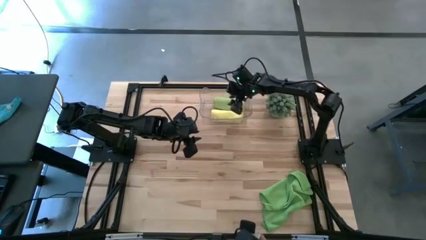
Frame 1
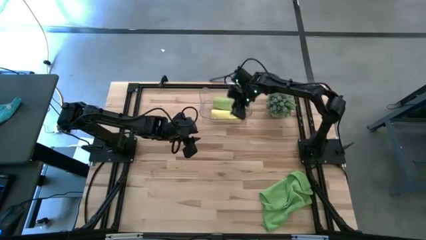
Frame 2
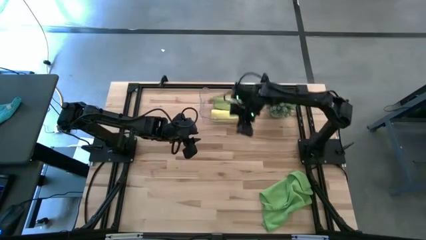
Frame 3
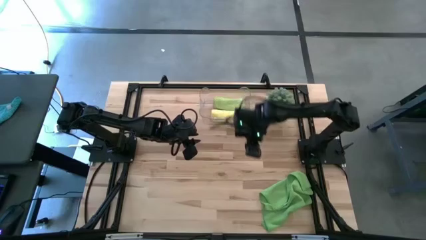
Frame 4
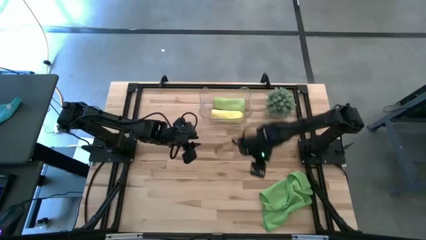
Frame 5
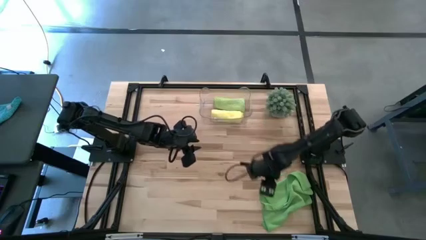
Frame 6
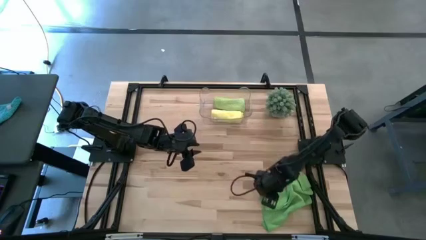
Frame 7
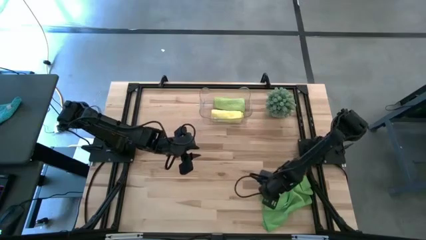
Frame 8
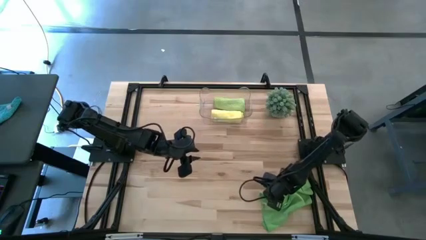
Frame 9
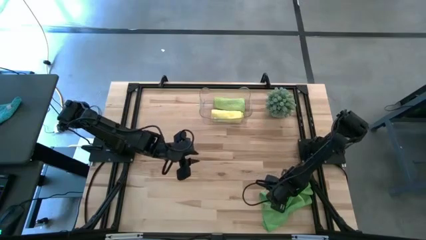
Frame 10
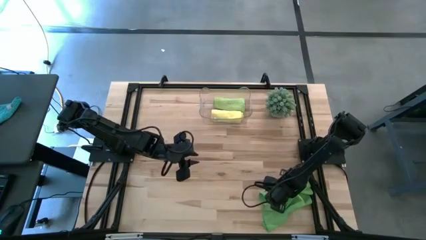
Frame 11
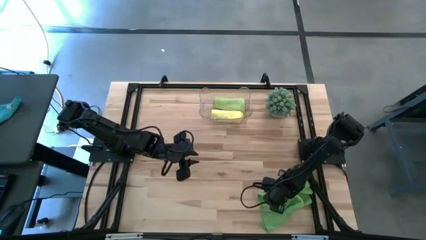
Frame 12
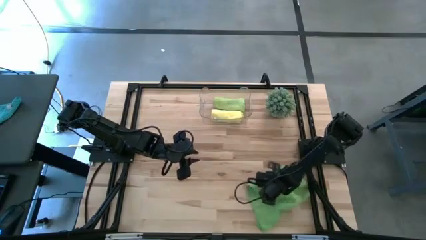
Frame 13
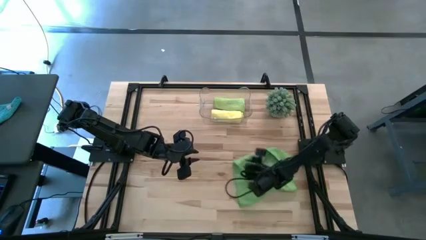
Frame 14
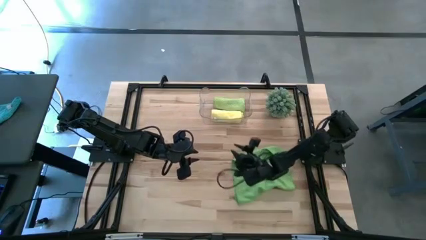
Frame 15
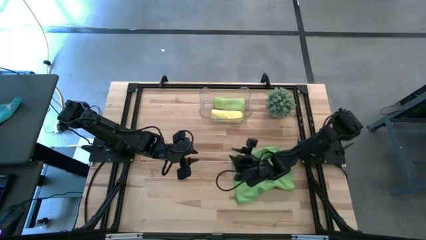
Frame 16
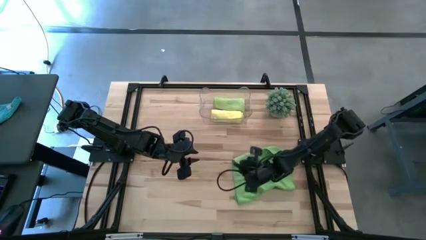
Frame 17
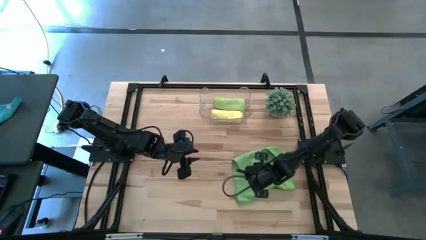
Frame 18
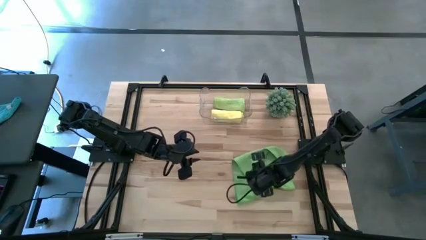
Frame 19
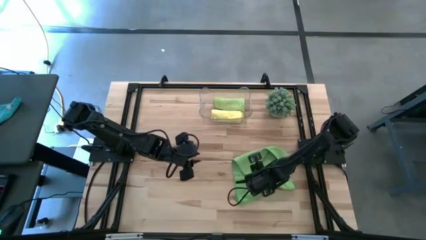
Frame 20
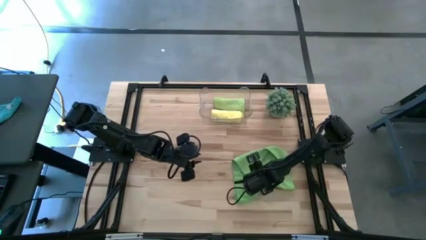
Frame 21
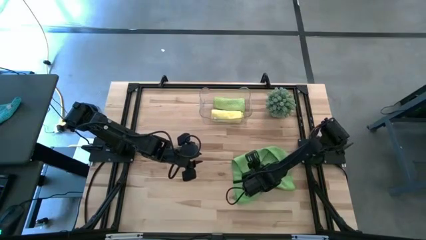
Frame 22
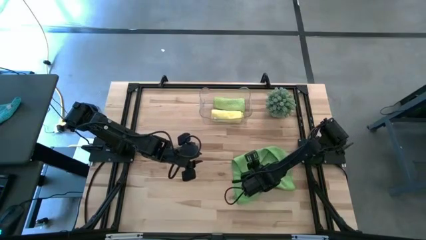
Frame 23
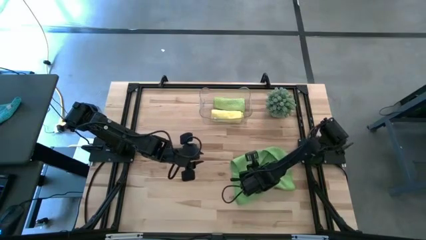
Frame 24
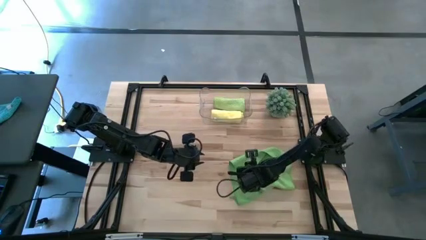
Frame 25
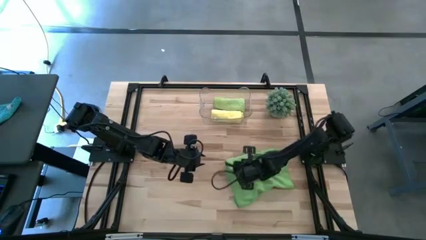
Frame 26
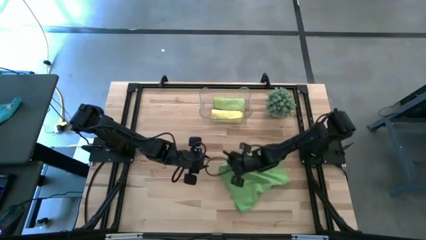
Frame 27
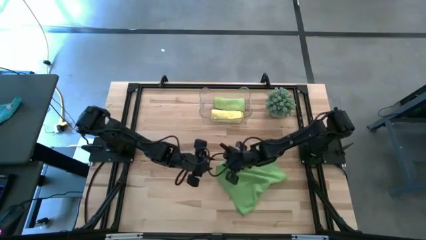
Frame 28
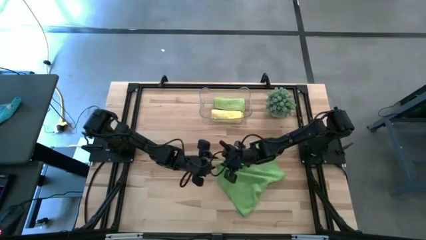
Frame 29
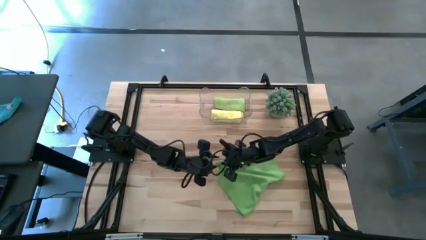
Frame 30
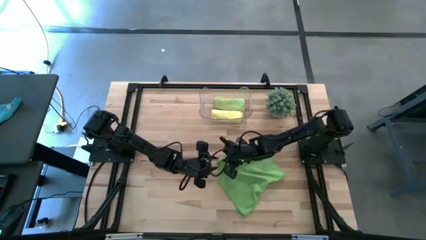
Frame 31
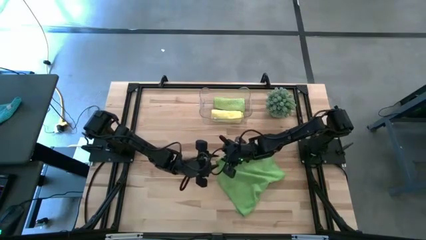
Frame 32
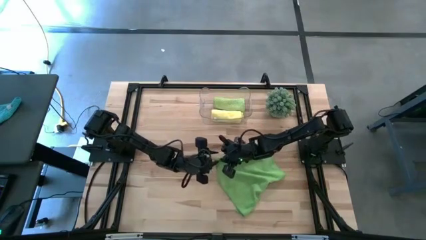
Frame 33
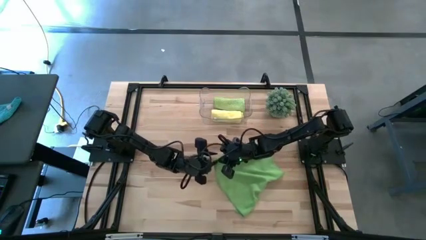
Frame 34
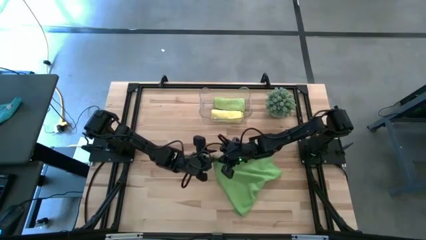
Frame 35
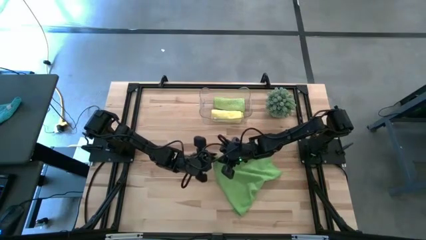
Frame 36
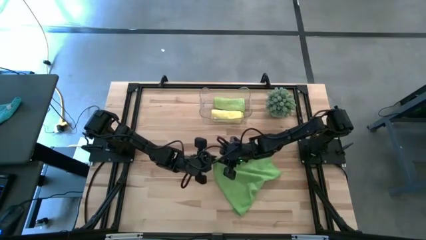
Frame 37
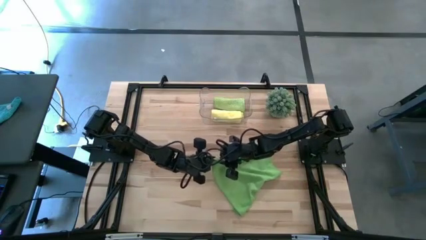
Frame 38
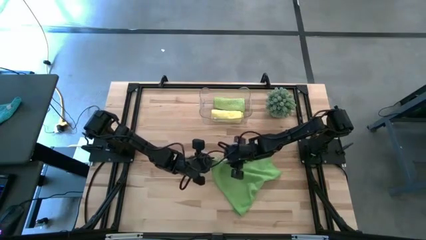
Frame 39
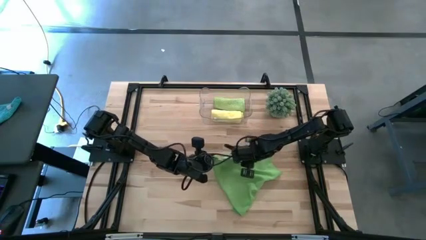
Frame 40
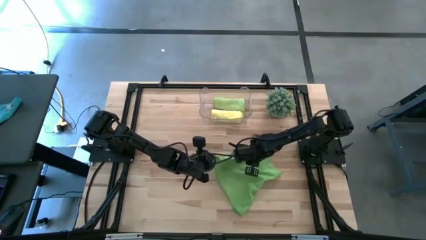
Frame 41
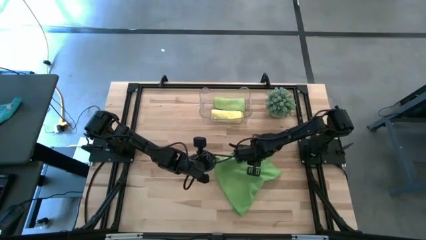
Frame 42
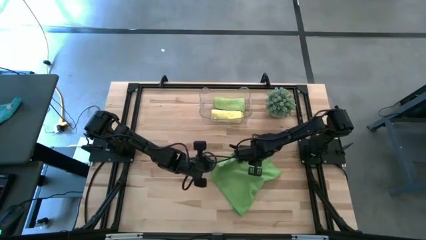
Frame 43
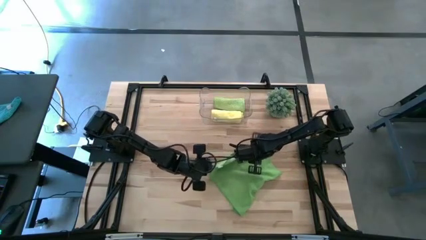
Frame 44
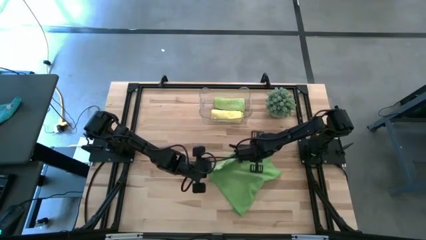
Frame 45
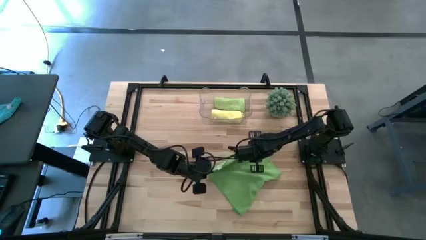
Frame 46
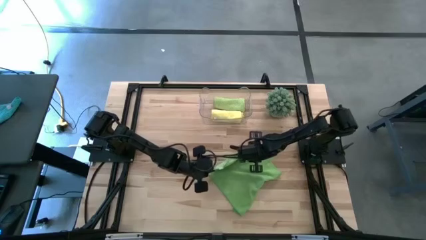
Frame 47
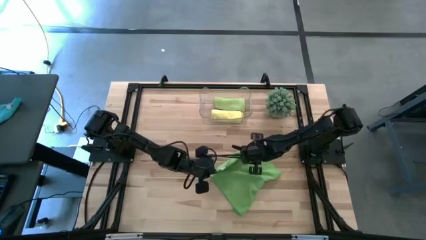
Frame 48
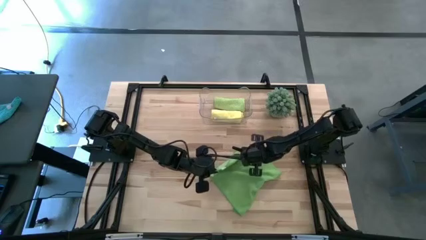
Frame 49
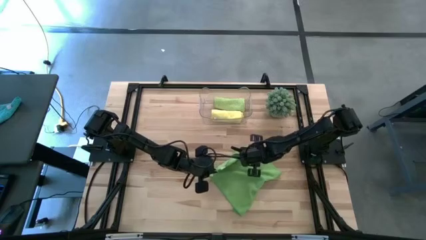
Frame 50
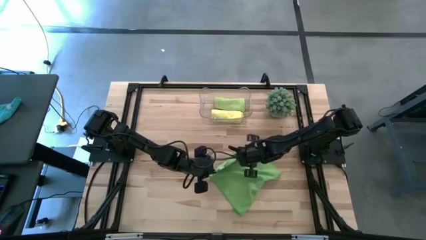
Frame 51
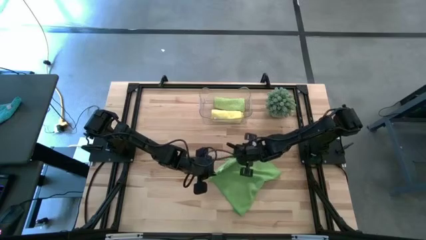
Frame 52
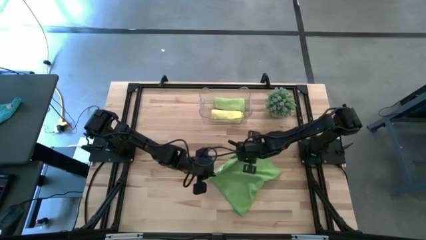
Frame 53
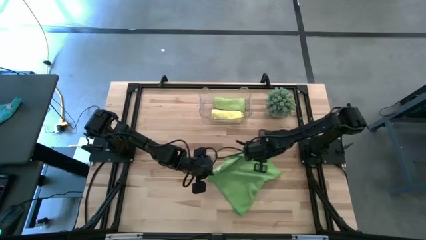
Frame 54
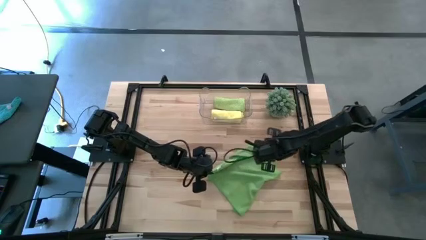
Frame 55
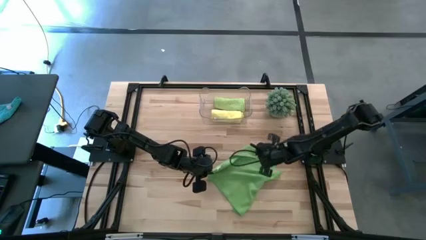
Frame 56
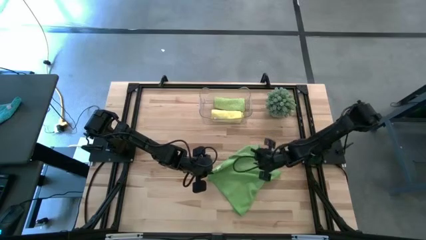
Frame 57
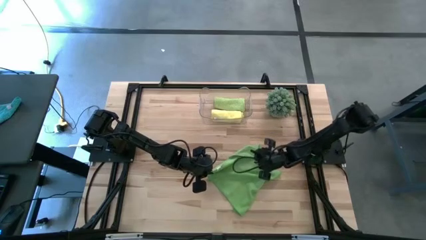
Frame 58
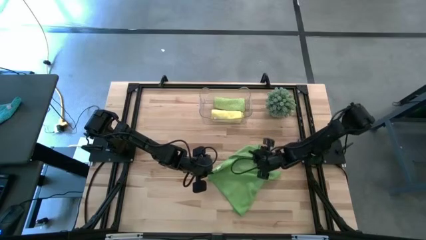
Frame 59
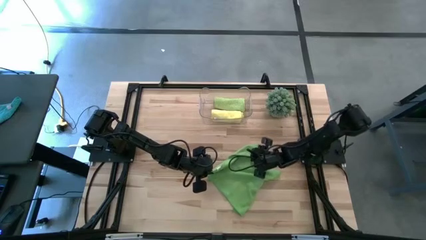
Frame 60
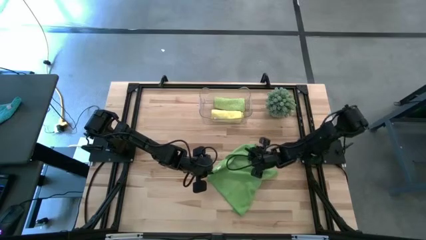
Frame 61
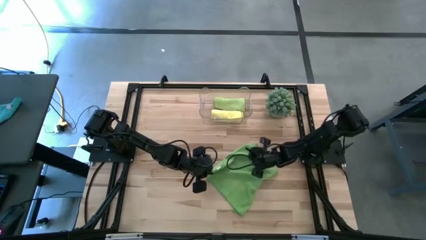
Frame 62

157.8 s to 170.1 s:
Task: Roll microfiber towels into tight, uniform cylinder then place into a basket
Fold the green microfiber towel
